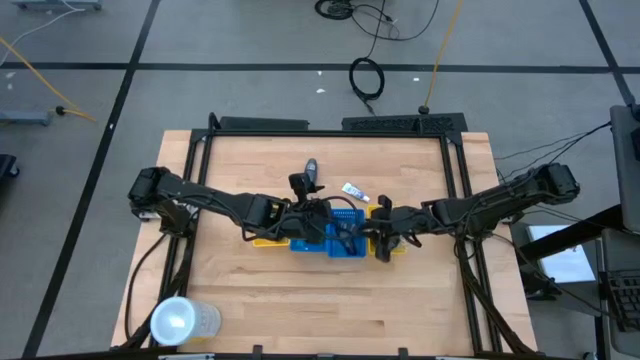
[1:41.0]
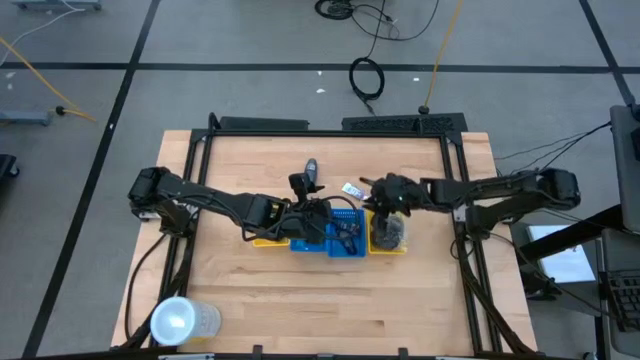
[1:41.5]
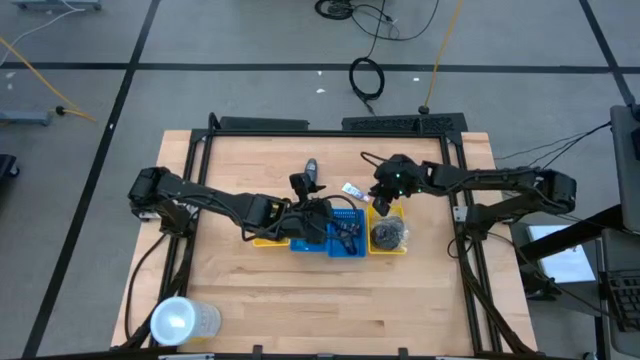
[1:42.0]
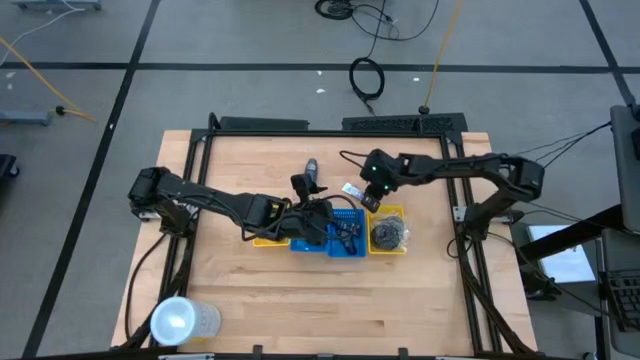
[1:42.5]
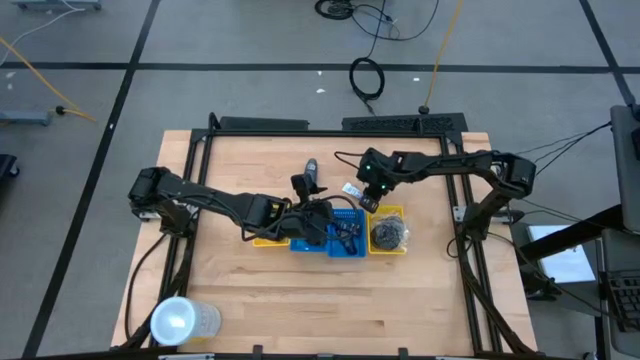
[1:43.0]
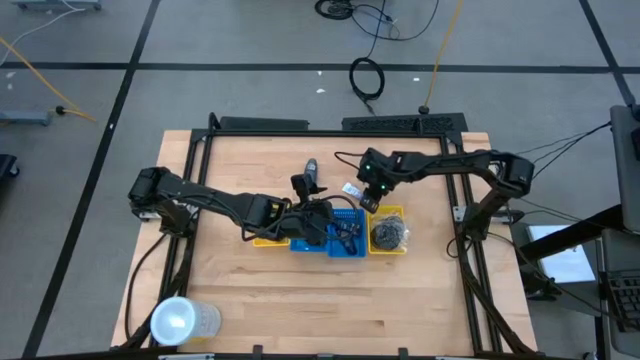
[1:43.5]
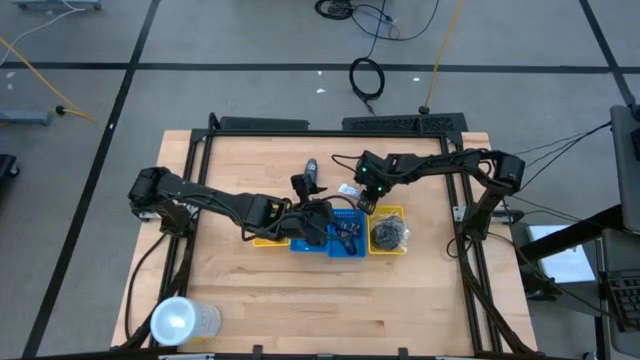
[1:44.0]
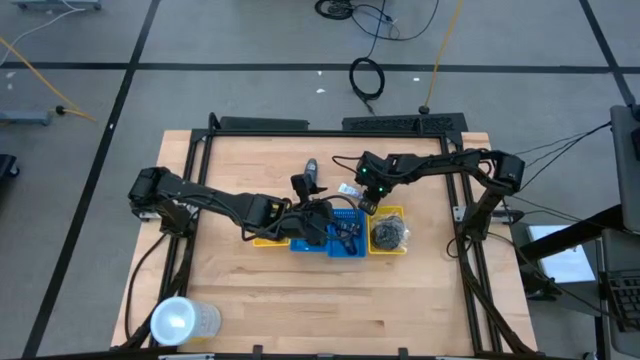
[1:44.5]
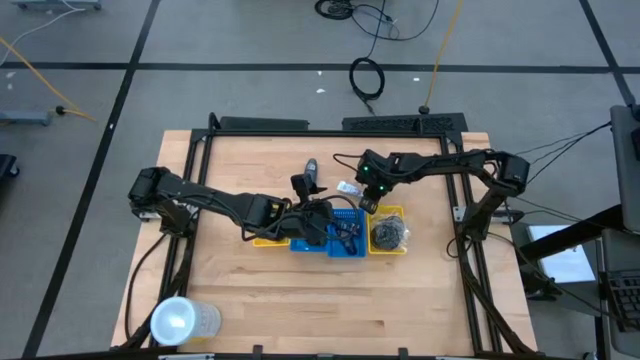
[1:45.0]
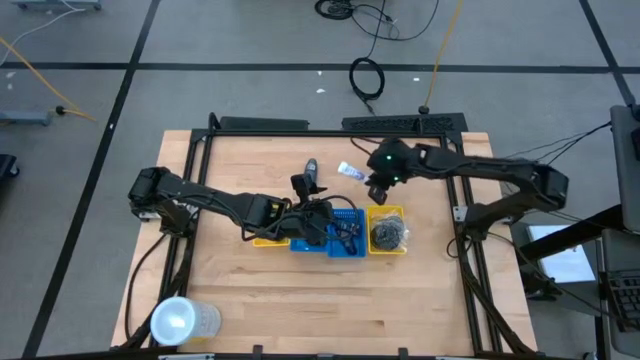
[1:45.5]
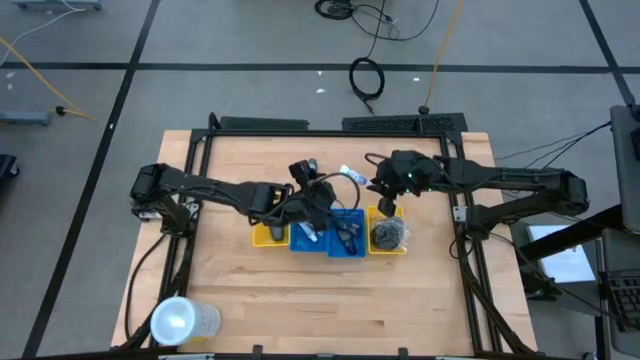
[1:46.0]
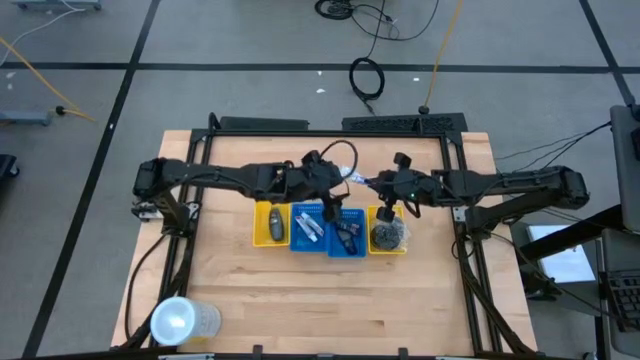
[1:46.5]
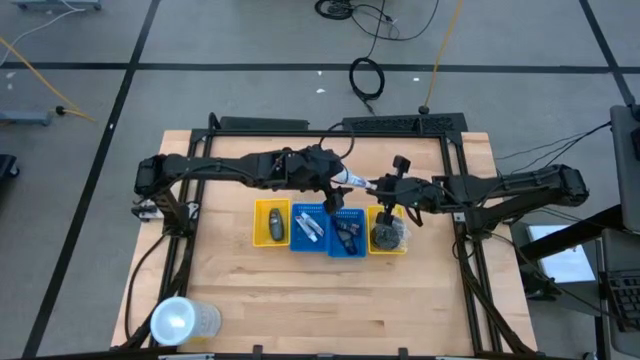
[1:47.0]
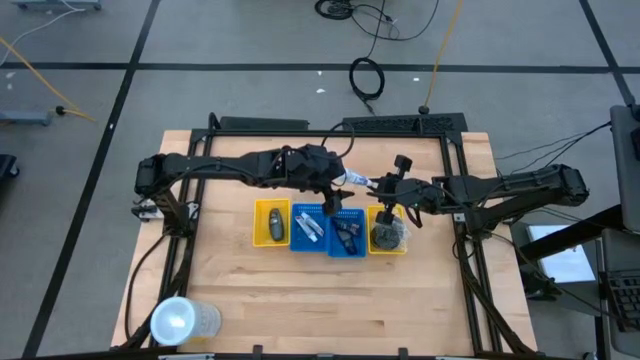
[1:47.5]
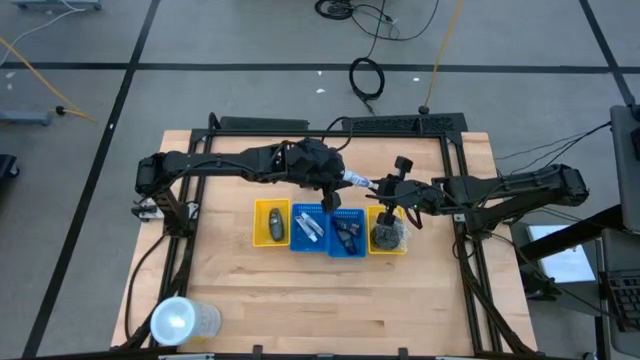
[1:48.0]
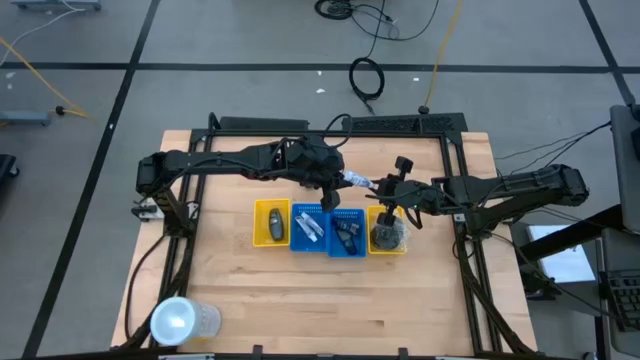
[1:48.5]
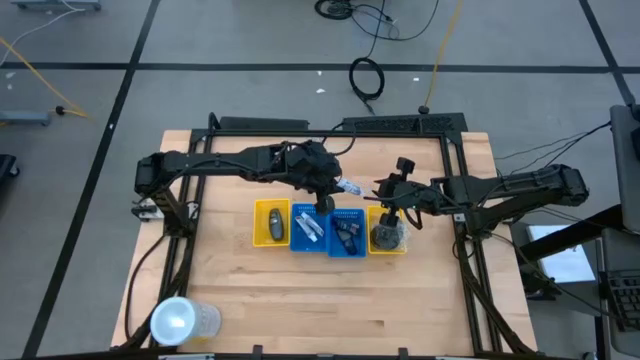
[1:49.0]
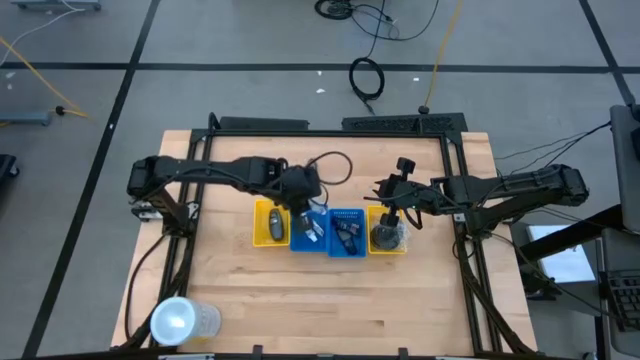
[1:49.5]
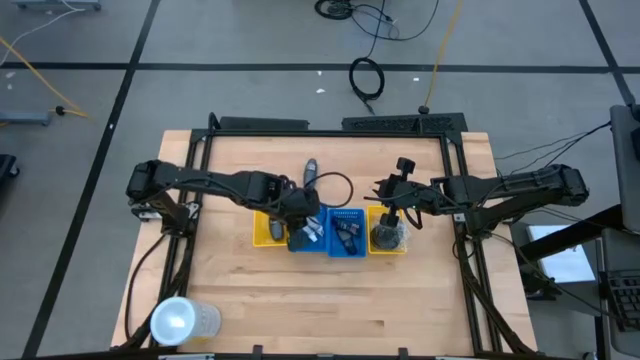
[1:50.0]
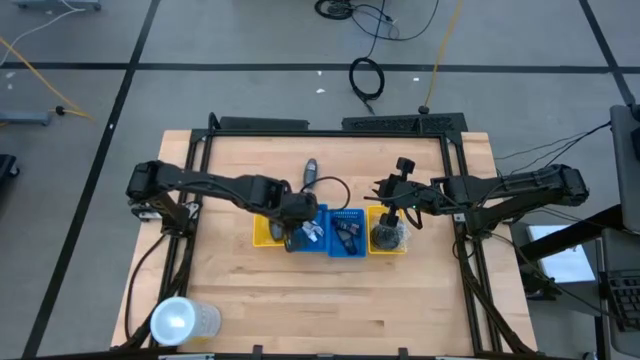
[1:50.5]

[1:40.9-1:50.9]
Task: Pick & Place Travel size toiletries
Put the white toothpaste into the left blue basket

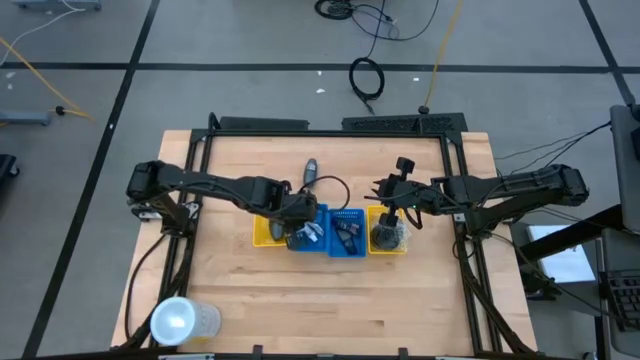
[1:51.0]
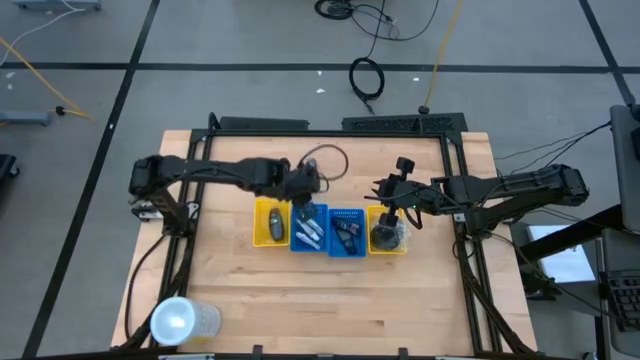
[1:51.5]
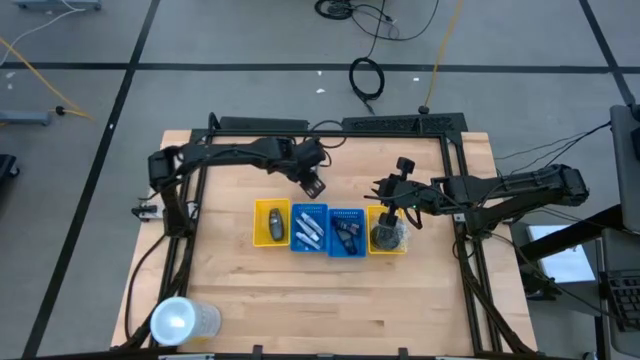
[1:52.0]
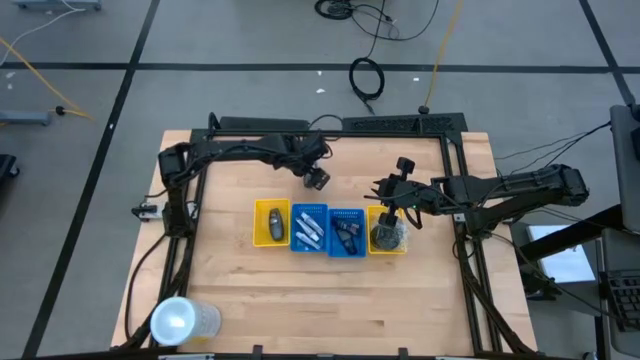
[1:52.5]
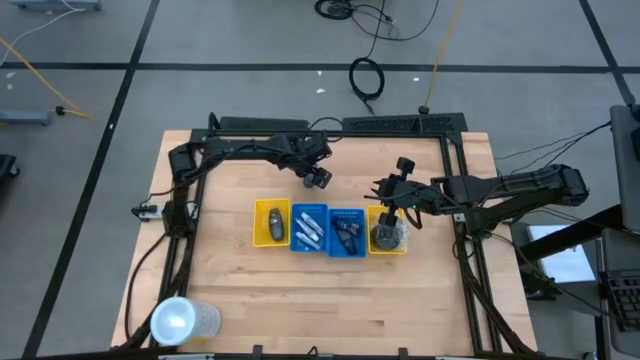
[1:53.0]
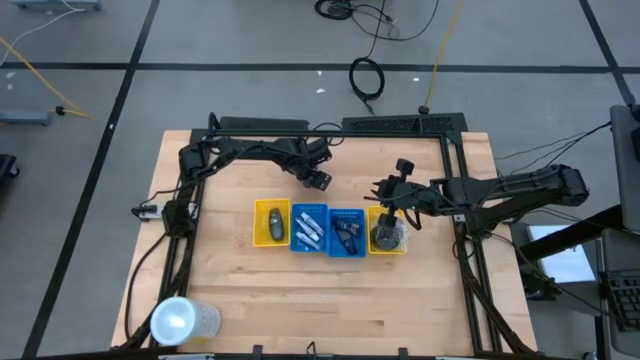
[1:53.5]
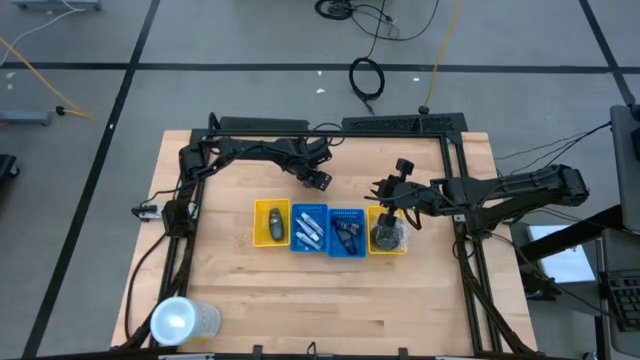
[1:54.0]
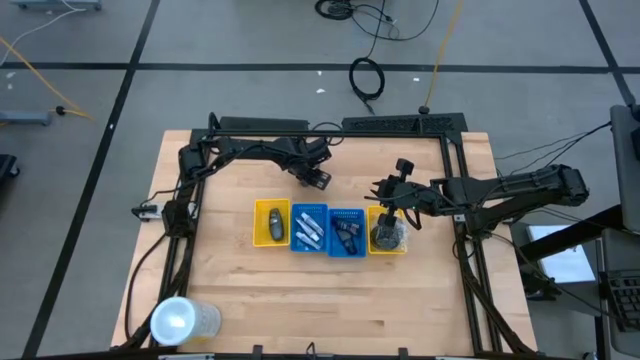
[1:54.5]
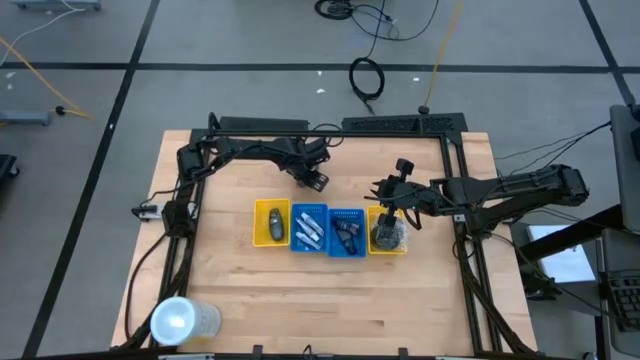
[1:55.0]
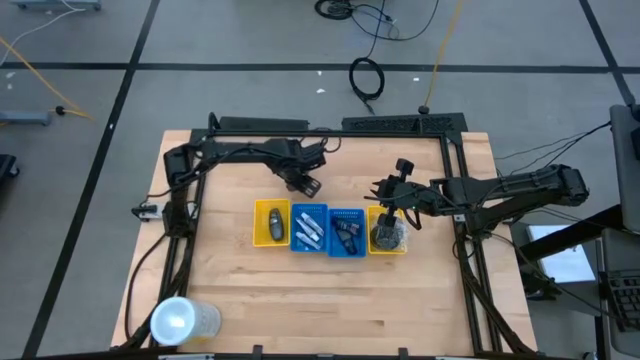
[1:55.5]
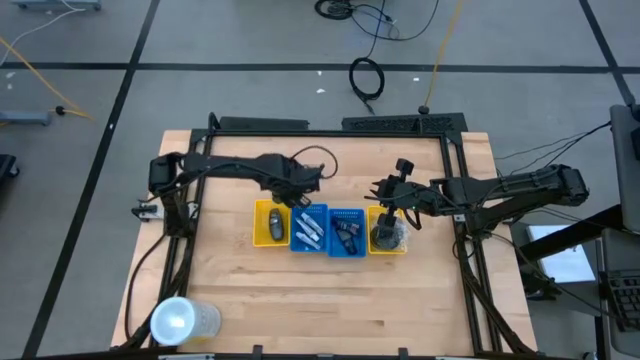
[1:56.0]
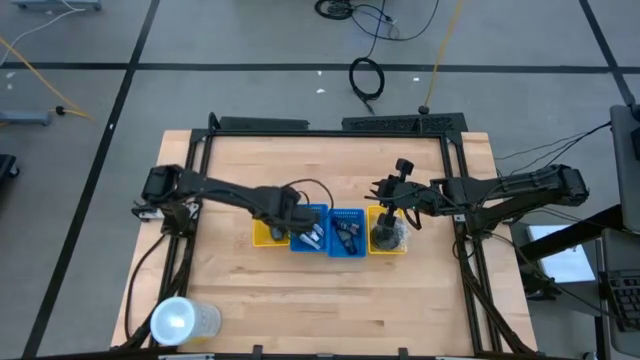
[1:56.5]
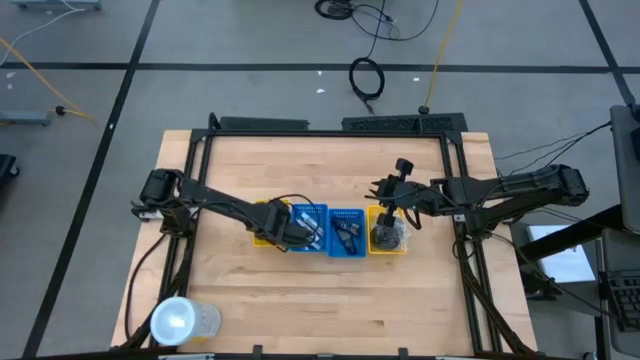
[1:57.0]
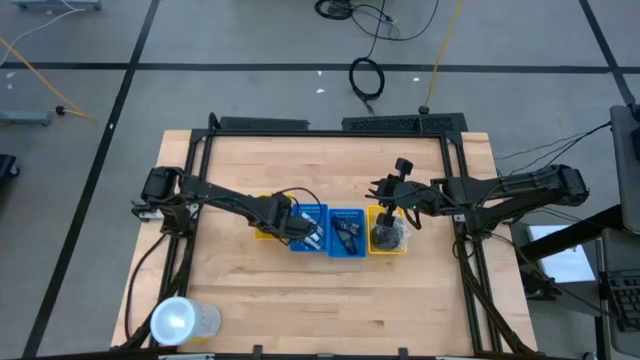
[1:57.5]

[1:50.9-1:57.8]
Put the black deodorant into the left yellow basket

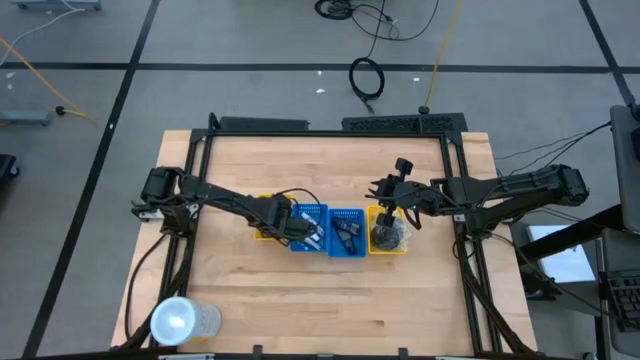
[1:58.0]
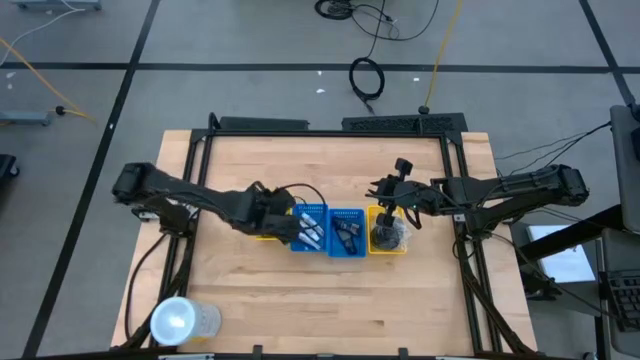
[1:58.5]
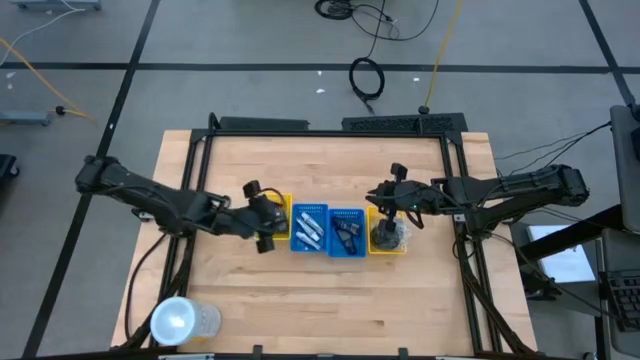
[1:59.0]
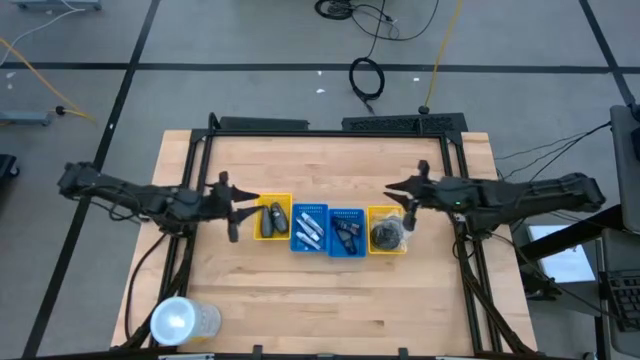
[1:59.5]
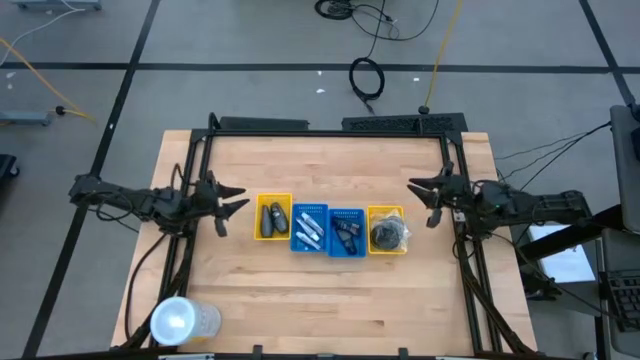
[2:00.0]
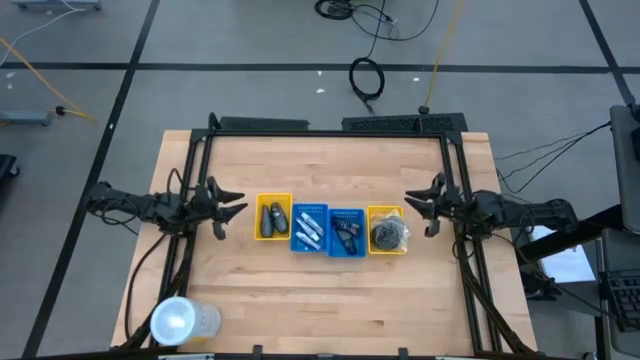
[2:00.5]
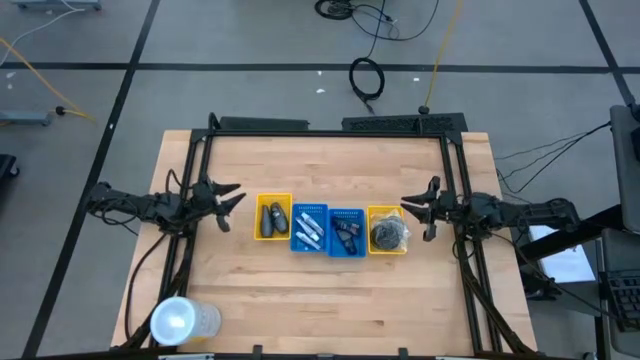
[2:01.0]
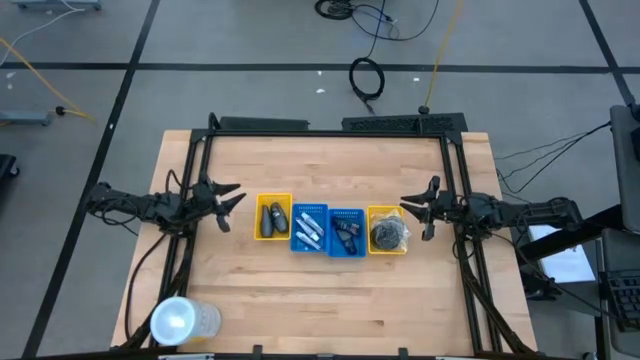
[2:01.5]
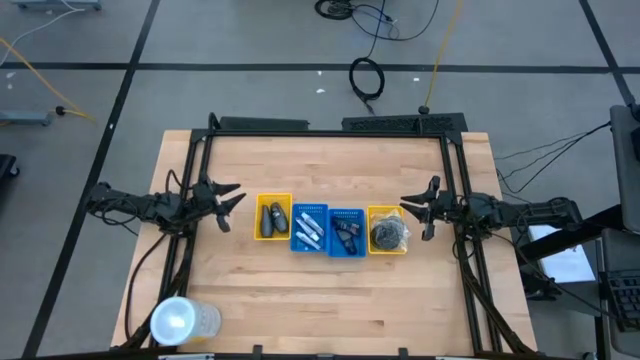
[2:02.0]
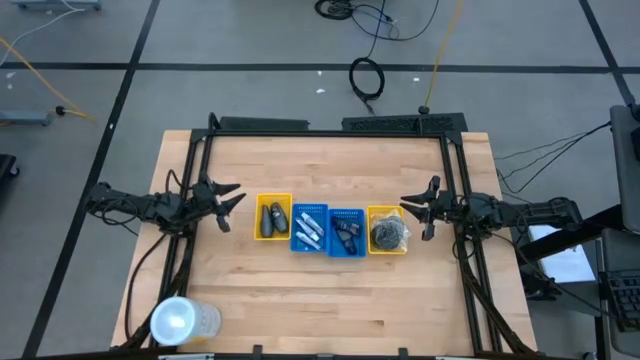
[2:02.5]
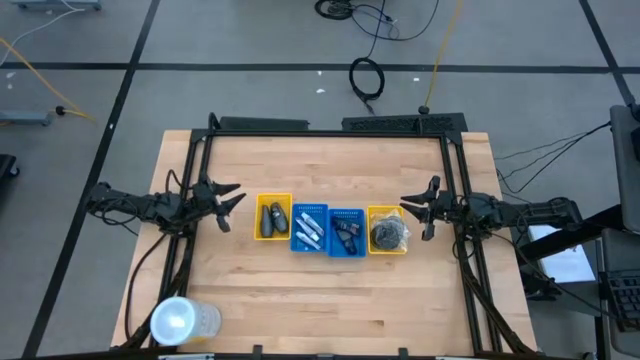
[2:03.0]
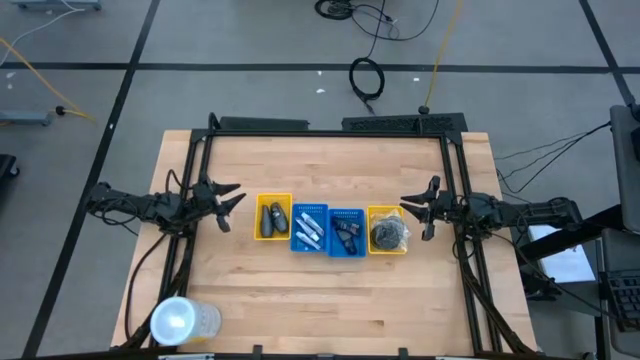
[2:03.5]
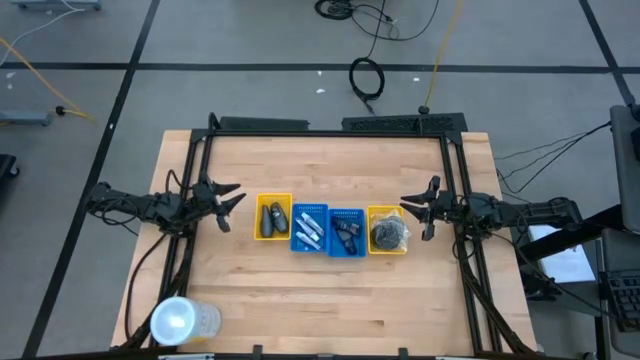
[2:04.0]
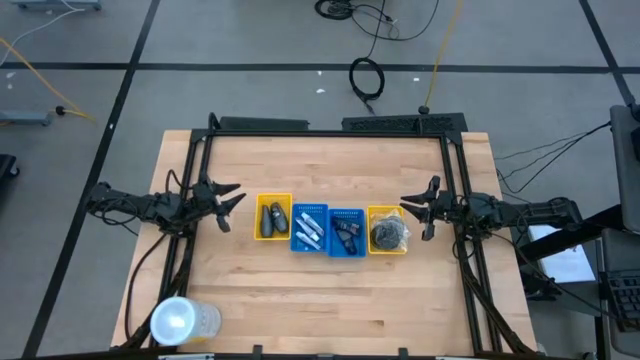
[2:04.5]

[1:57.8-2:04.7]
Return to Home Position
